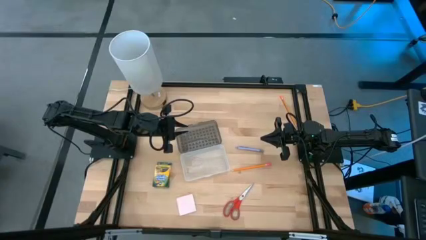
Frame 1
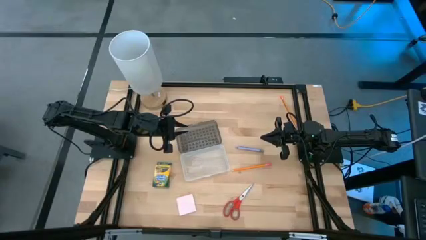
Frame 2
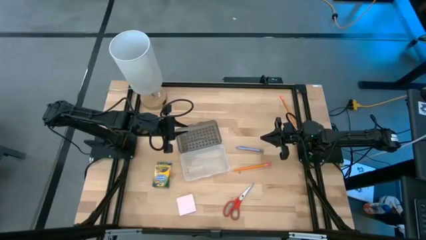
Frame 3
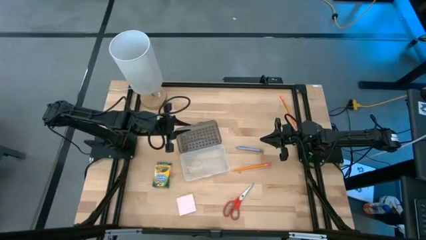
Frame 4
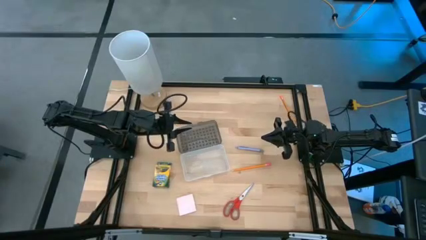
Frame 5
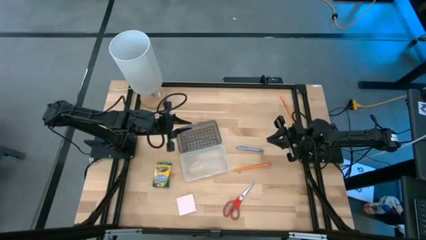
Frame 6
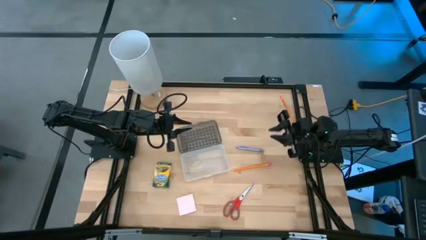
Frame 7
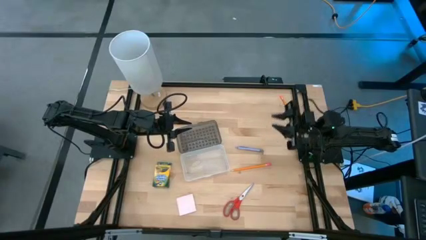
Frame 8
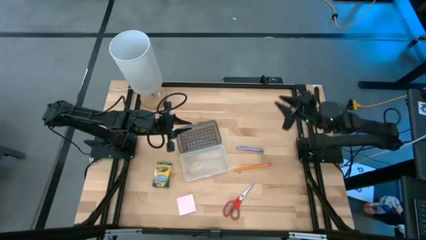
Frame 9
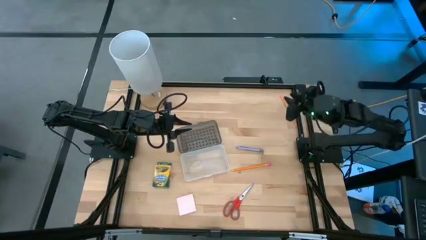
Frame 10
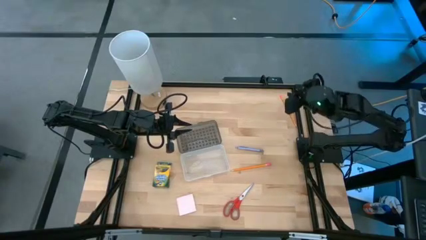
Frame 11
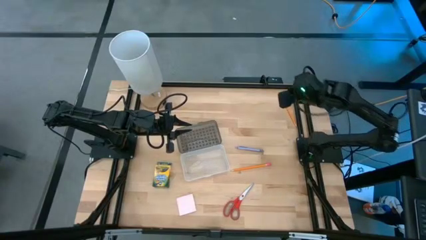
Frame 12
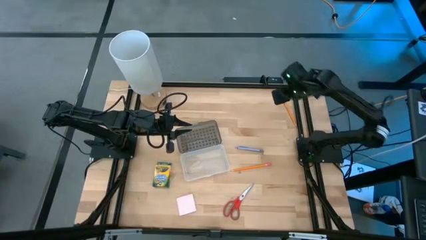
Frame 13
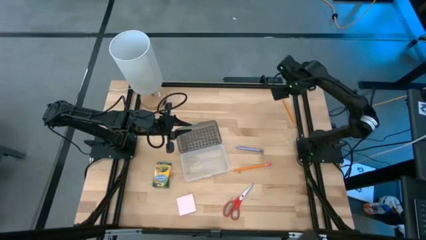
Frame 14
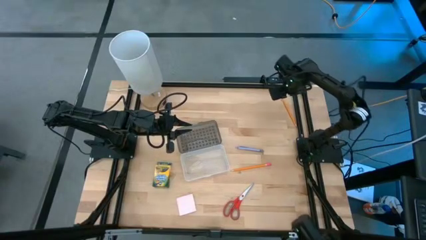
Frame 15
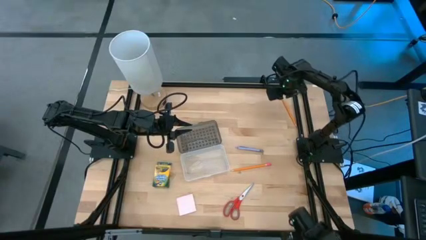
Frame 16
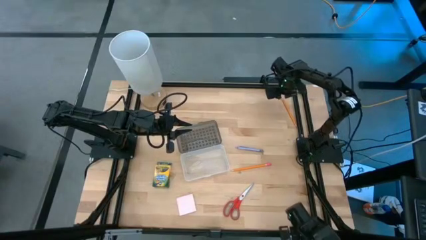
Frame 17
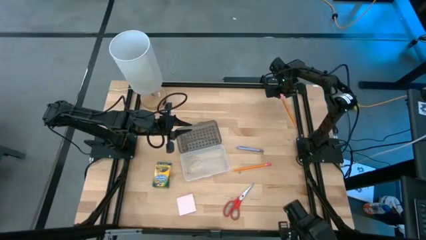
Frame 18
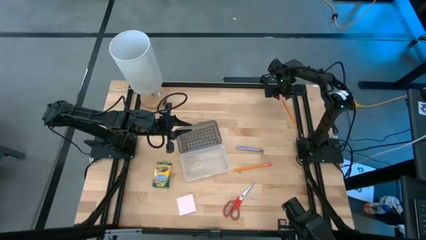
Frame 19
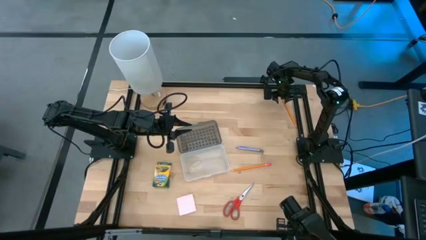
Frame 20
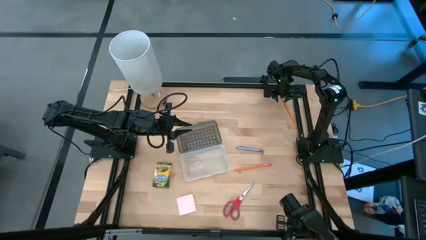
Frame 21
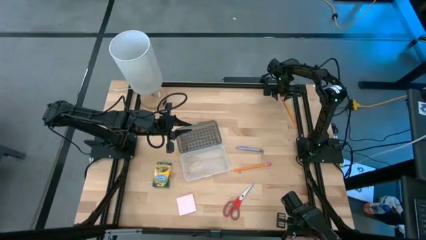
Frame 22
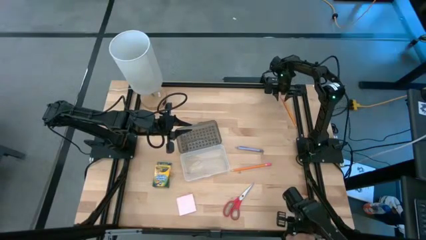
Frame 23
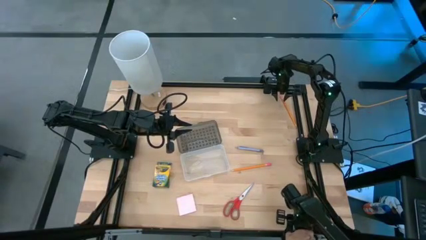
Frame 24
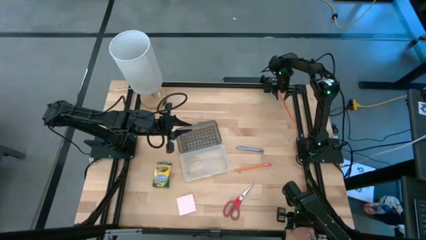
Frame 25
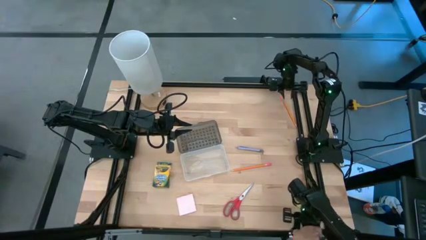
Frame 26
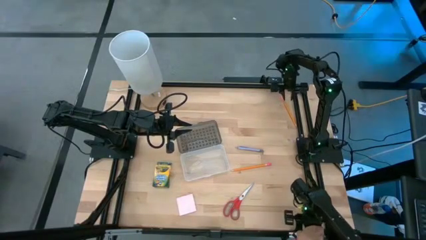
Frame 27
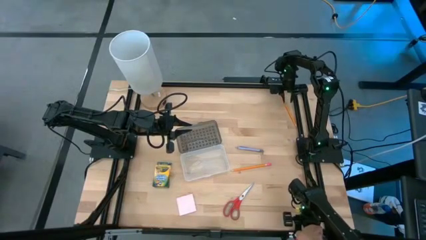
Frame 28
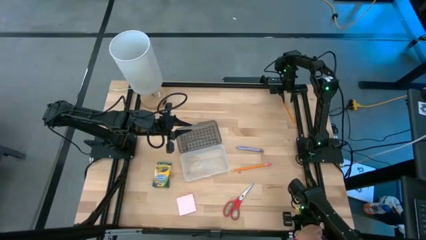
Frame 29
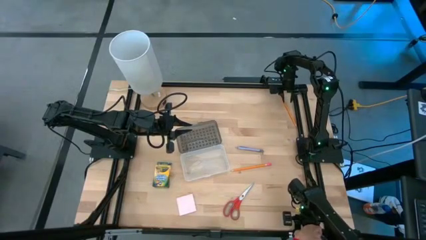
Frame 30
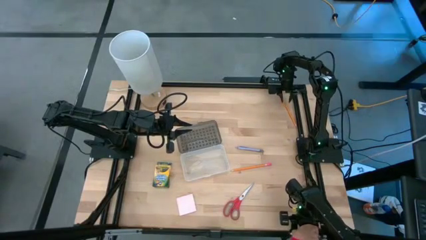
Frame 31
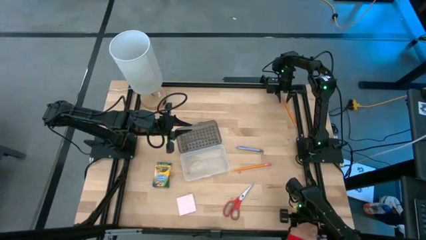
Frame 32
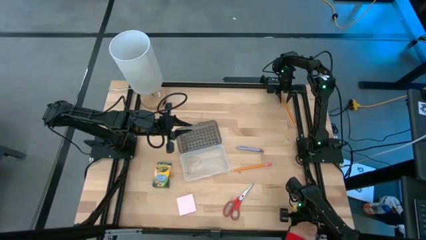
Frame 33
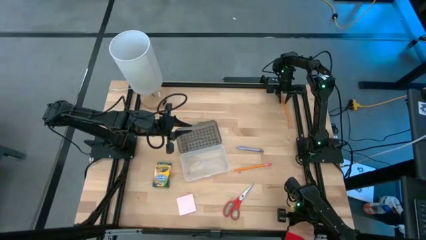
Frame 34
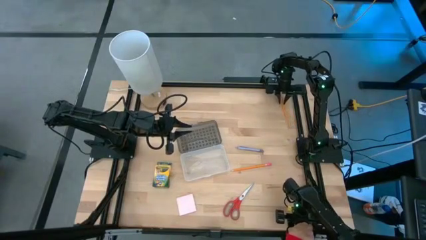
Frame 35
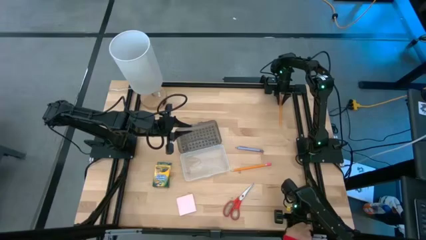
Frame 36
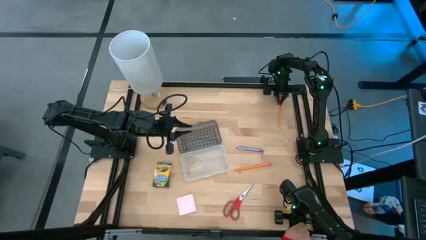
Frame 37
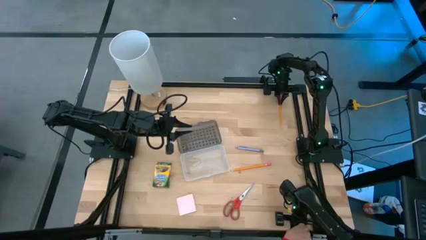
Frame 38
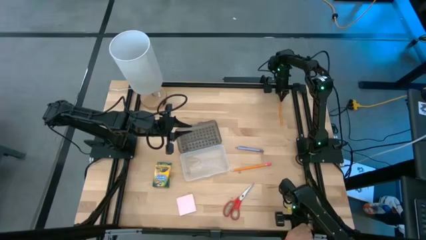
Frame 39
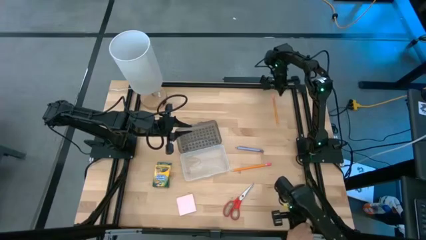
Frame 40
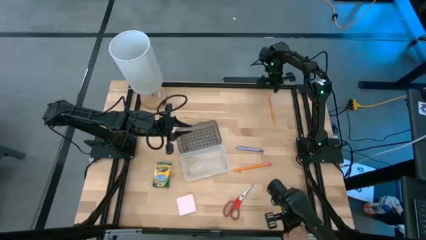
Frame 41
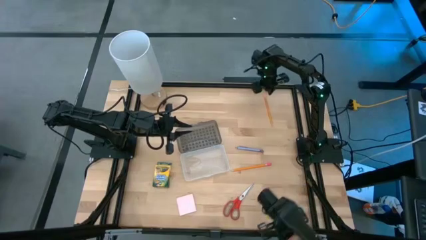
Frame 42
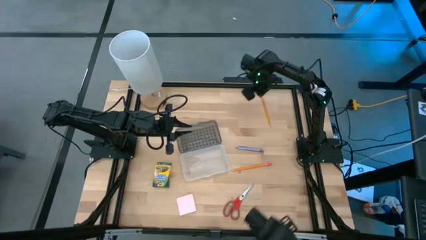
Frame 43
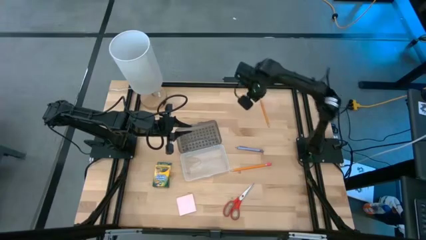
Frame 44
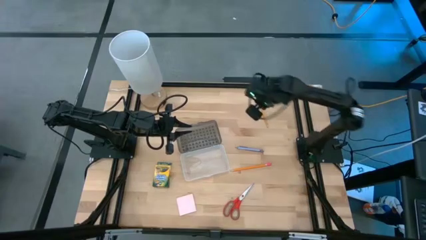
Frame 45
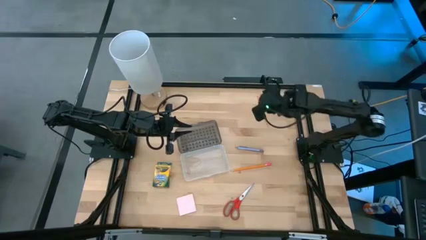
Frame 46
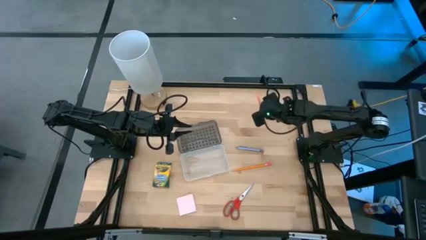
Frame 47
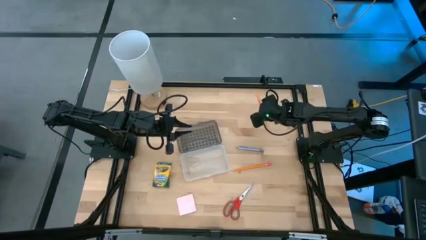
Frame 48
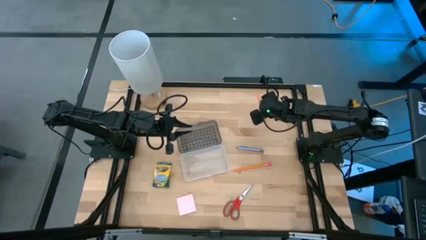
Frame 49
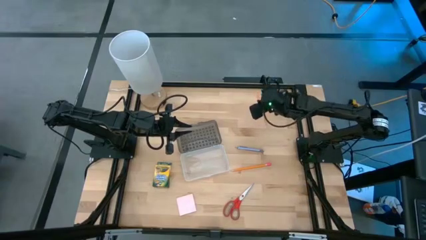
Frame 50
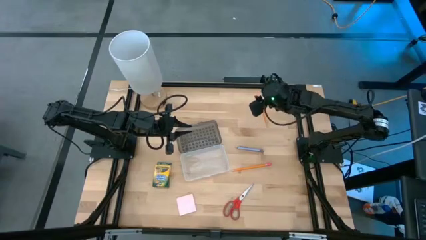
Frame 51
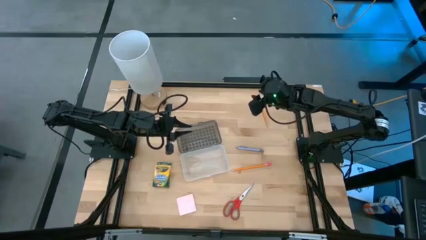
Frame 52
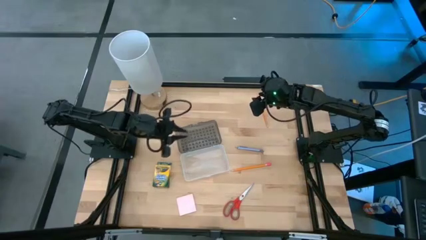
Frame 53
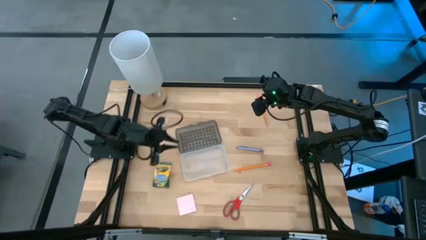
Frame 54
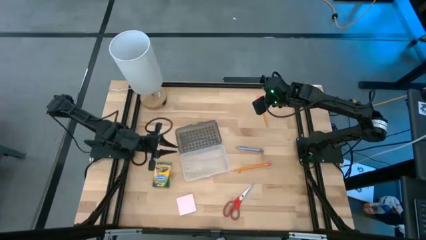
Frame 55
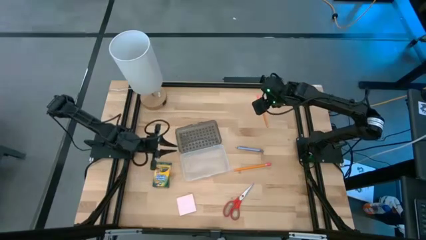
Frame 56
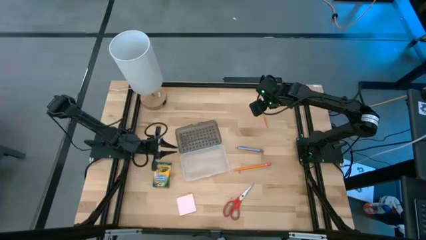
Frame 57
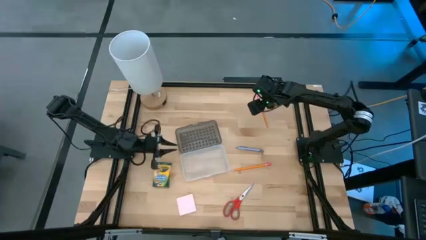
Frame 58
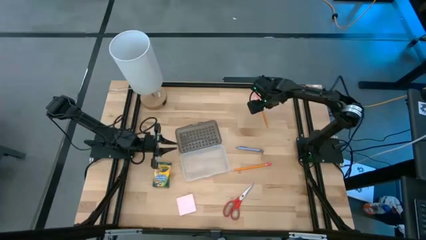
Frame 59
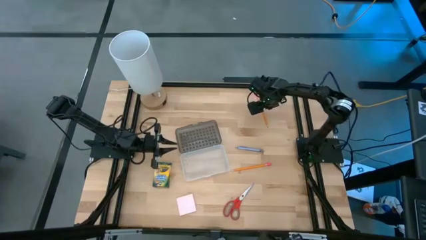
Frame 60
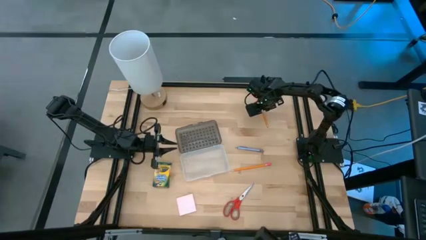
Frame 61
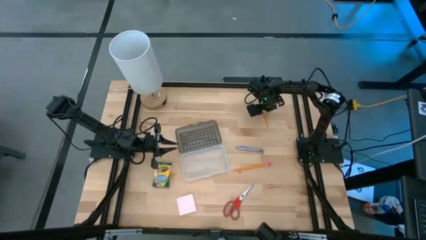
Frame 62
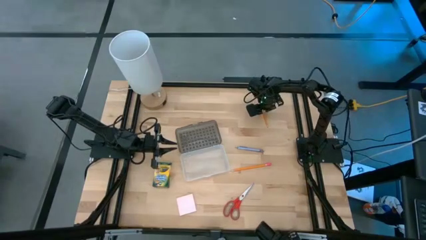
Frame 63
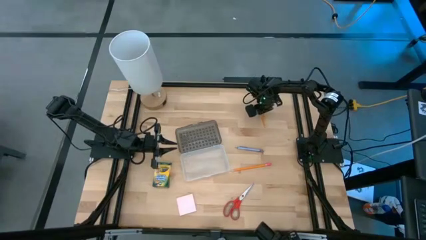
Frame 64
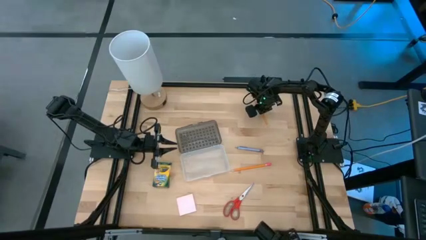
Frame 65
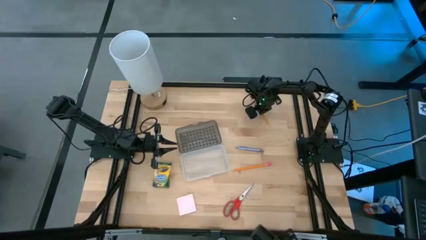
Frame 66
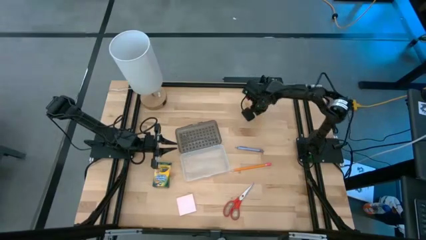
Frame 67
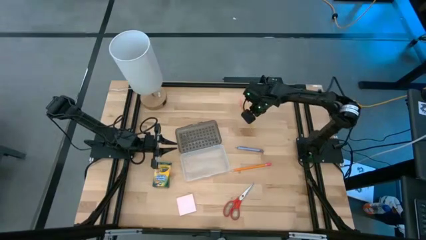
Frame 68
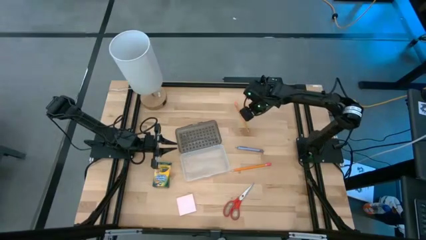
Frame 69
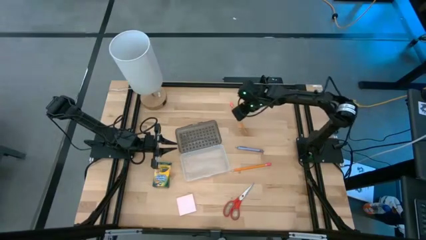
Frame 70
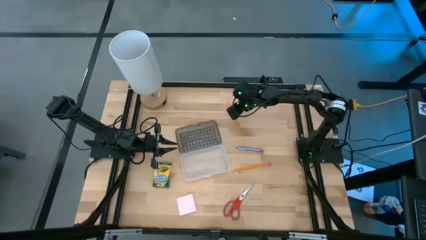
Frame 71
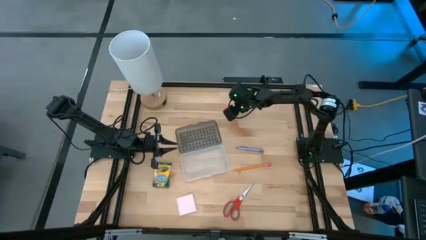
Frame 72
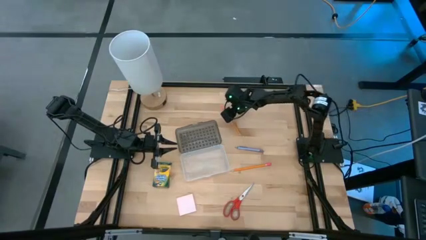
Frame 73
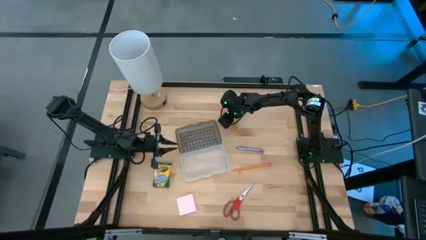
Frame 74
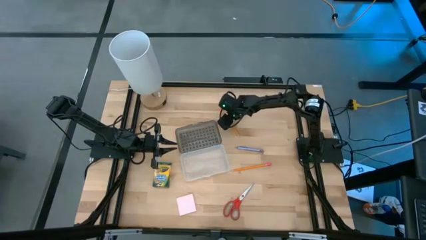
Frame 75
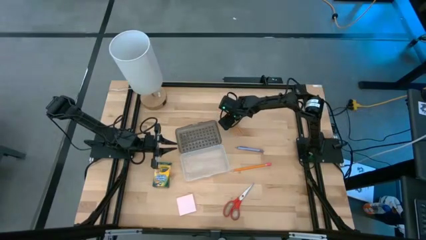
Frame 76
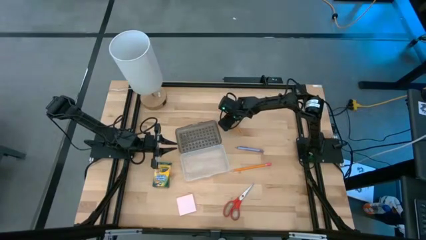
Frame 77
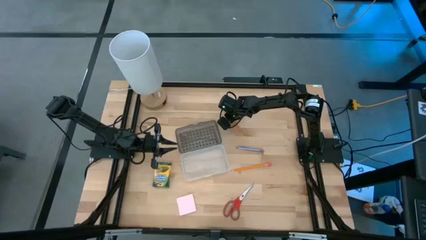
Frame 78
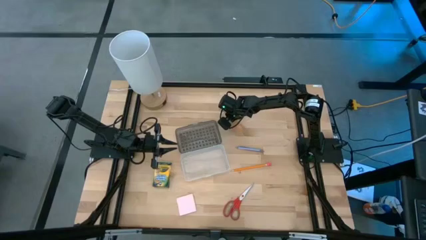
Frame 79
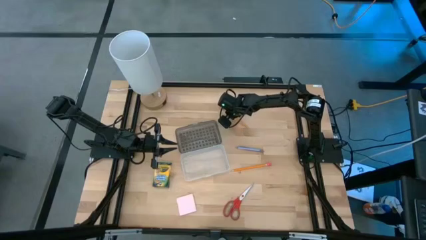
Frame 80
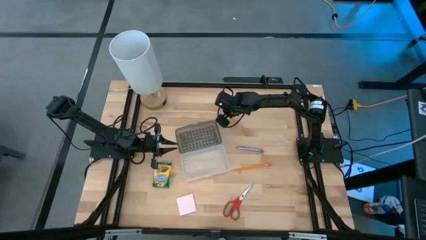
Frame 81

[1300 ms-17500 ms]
Task: Pack school essentials
Put the top orange pencil into the gray supply box
